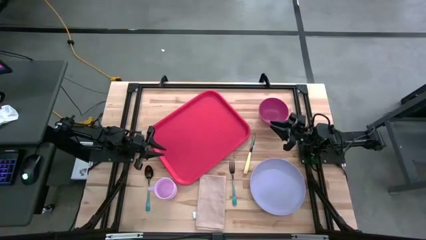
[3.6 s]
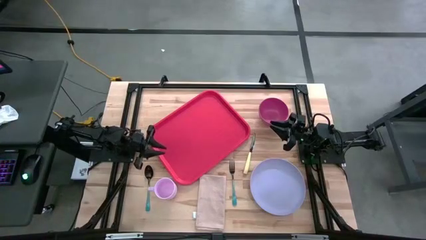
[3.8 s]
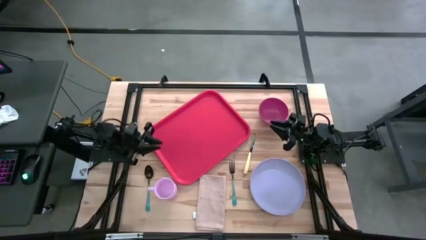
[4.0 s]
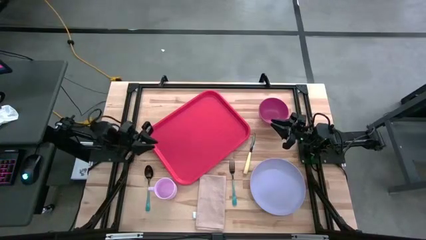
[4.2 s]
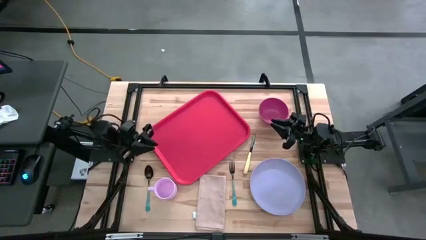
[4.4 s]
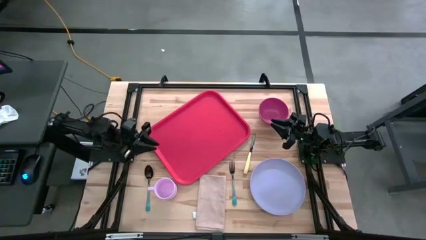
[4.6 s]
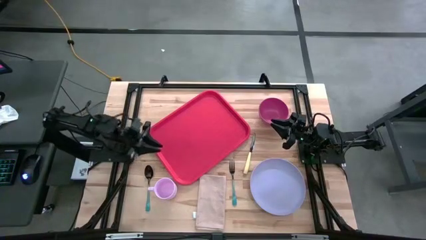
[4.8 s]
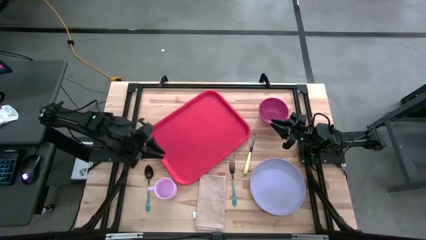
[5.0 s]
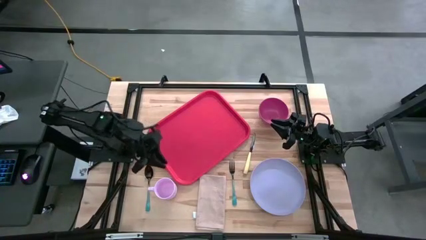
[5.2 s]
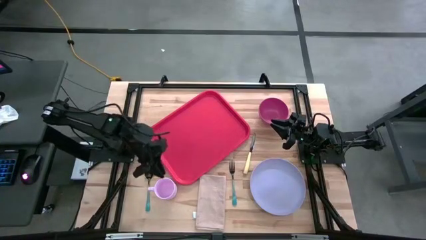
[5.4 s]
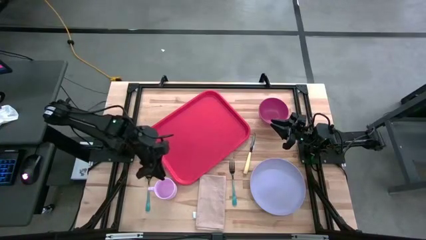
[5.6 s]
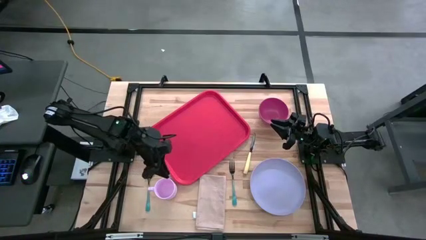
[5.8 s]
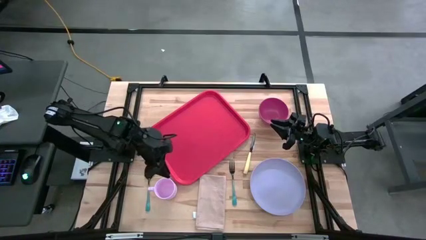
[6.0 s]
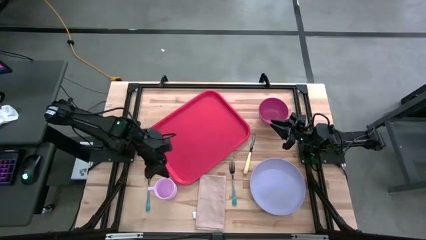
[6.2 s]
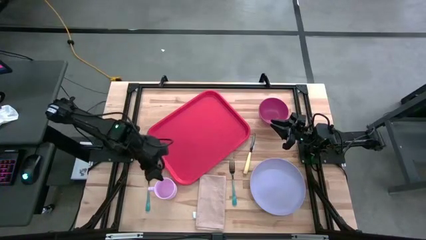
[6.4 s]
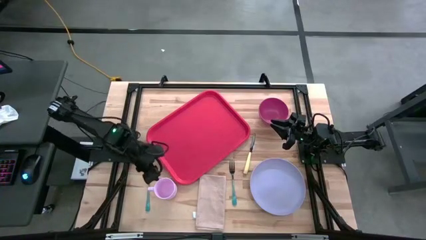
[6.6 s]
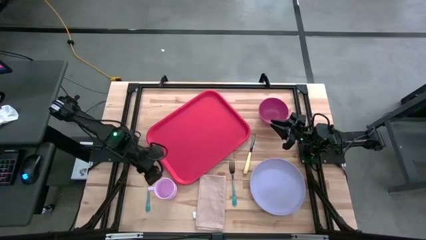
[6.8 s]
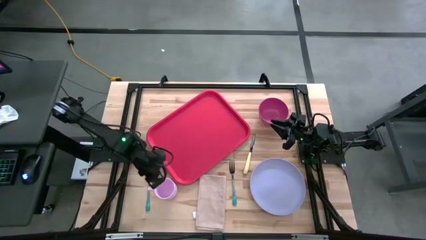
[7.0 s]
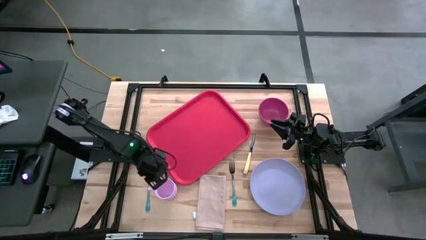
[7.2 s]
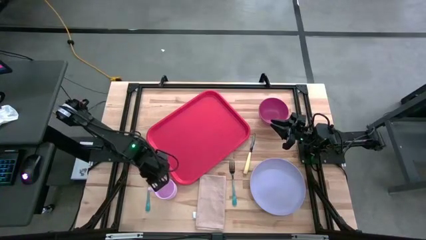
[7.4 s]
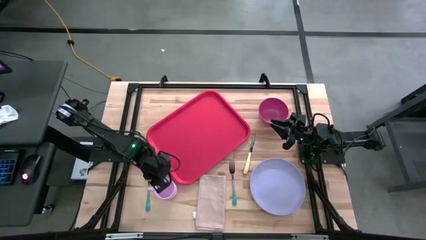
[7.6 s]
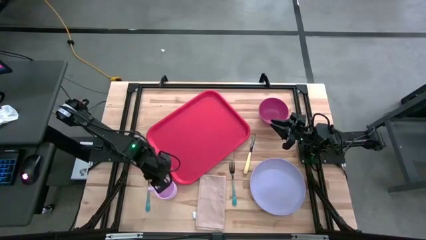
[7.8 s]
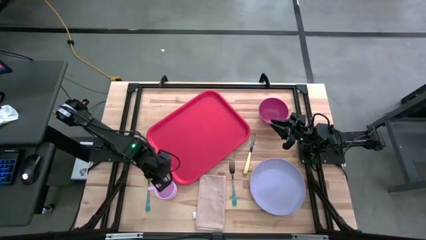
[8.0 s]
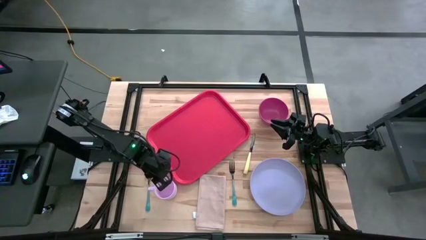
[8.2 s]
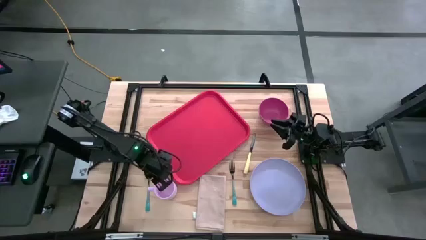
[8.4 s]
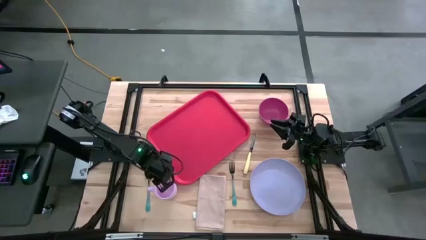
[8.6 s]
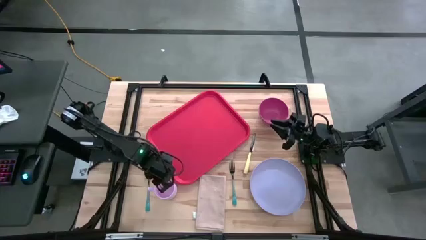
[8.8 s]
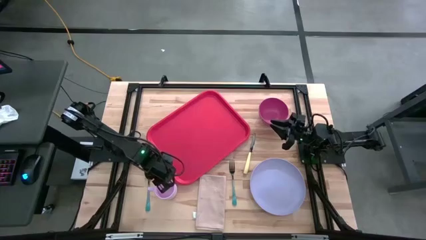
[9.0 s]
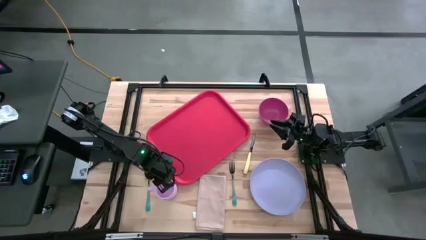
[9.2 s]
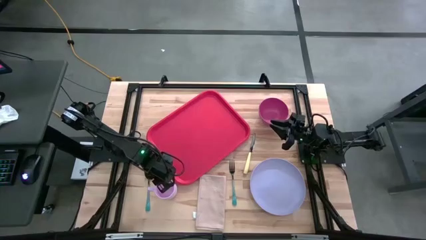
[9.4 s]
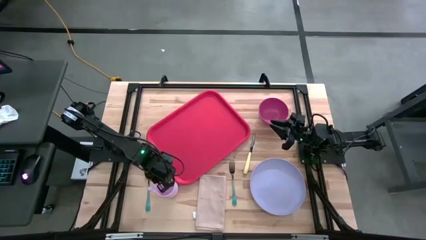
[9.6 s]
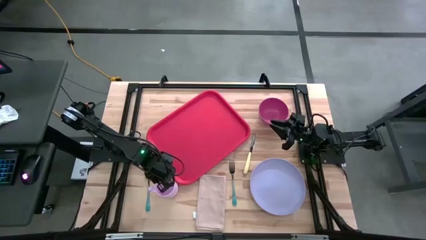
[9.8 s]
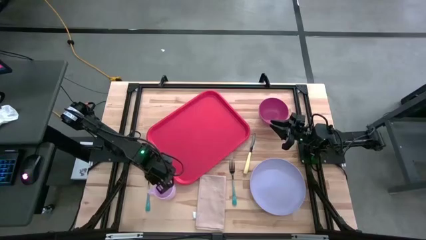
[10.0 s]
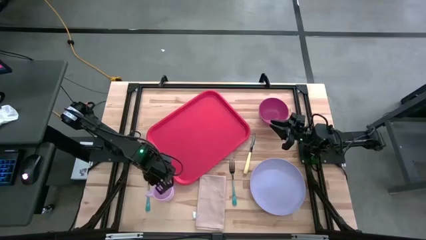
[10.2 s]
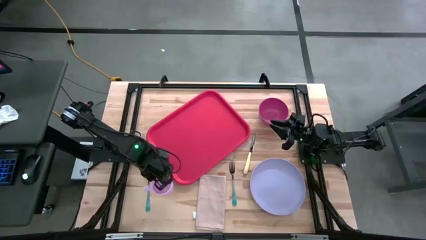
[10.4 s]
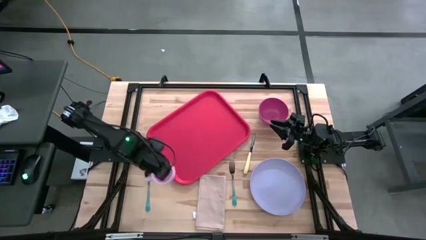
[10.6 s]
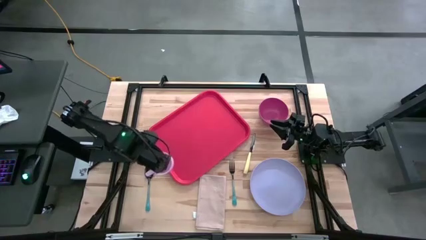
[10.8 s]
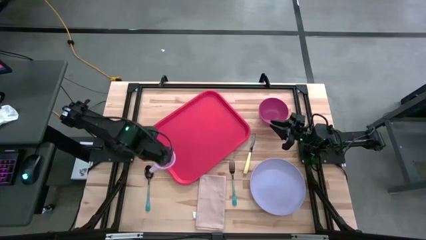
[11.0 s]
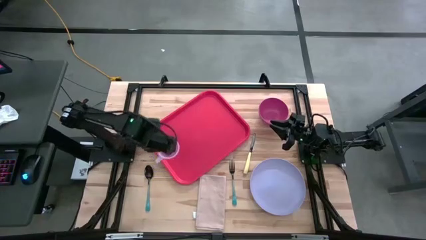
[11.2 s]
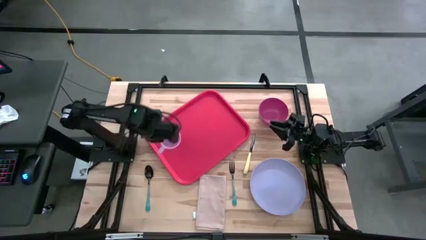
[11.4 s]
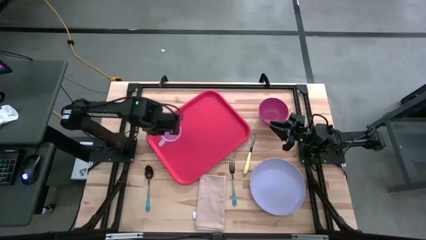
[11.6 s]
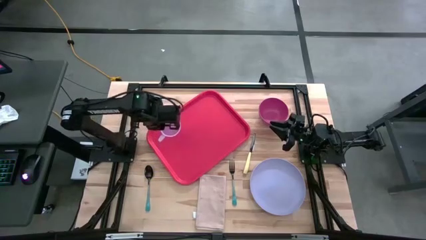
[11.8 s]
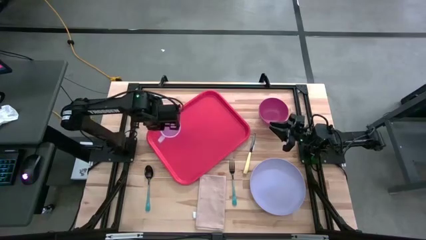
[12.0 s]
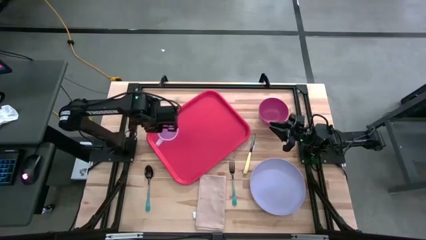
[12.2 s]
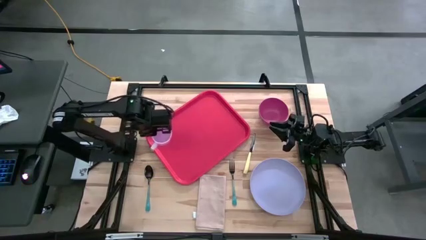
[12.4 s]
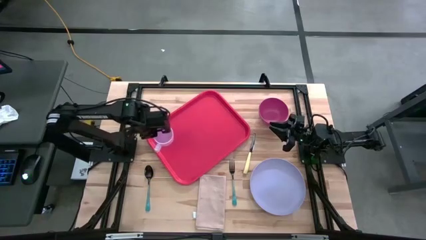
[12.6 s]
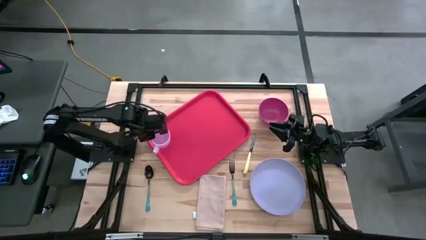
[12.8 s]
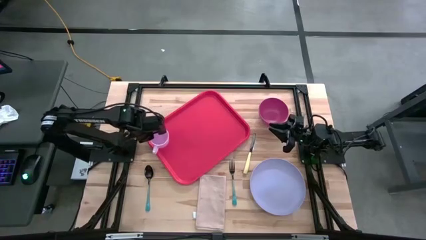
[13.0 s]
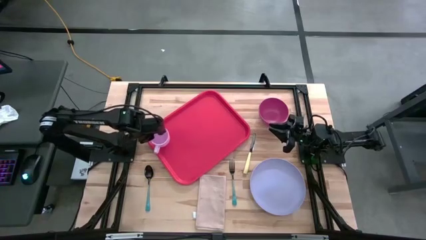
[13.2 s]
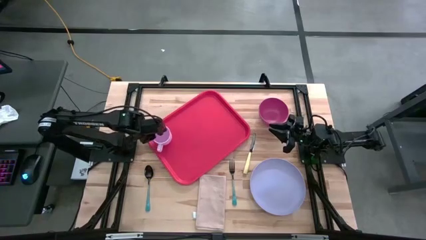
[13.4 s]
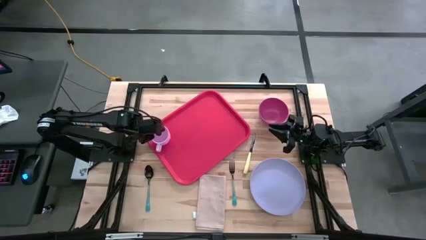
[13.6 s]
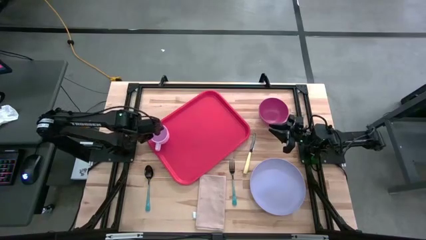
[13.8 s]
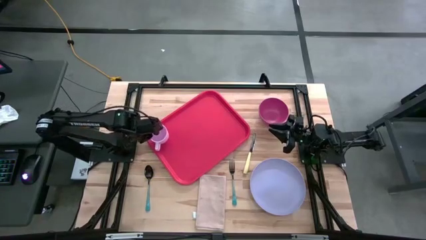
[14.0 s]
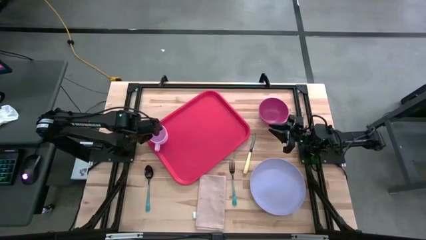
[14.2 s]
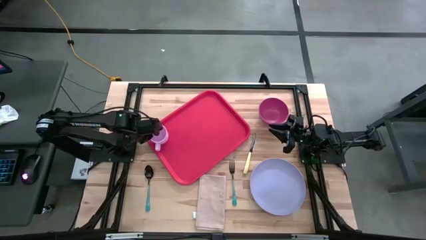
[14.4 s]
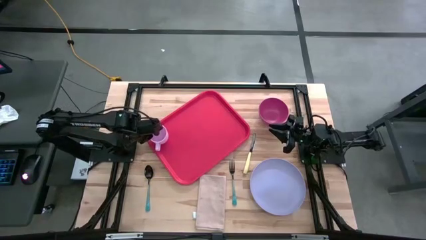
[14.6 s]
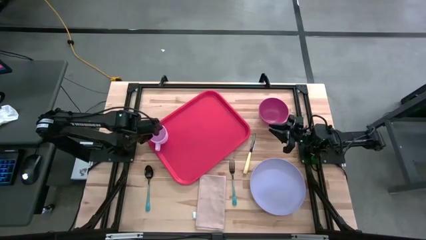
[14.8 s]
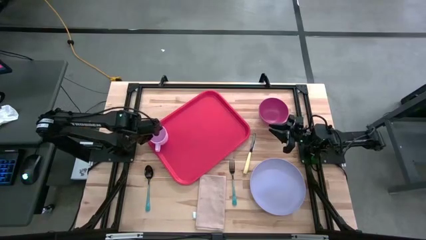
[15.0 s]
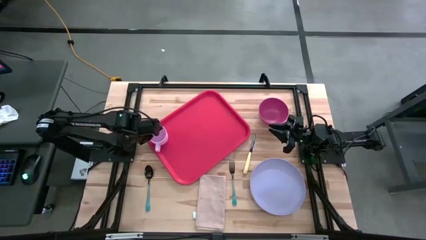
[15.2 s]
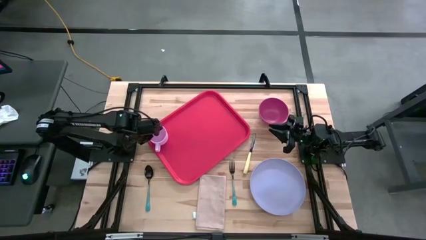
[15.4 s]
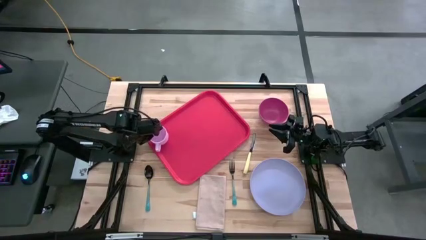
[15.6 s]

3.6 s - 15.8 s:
Task: Set up tray
Put the light pink mug on the red serving tray
